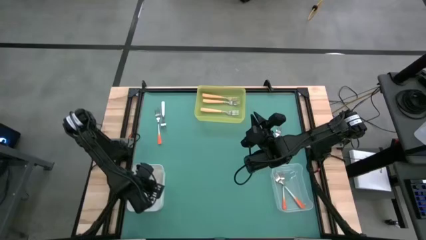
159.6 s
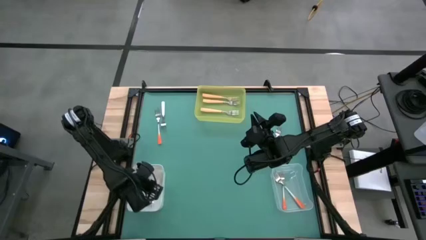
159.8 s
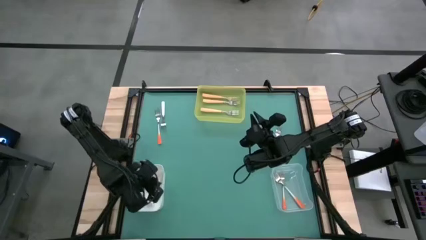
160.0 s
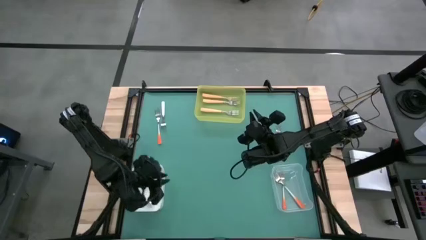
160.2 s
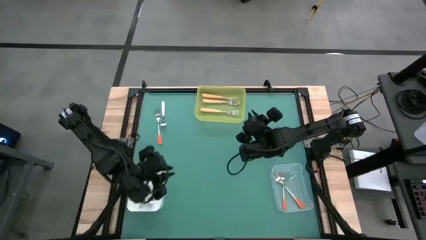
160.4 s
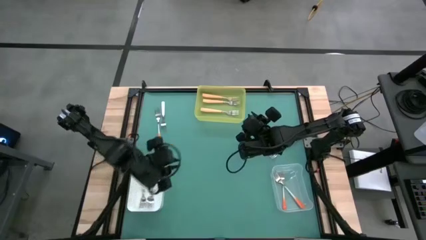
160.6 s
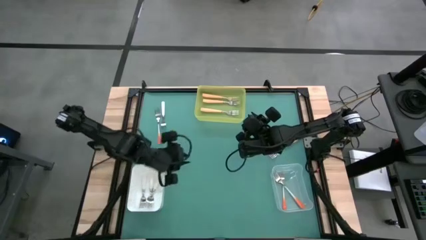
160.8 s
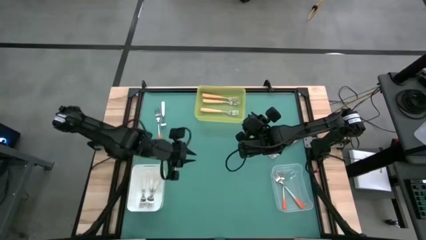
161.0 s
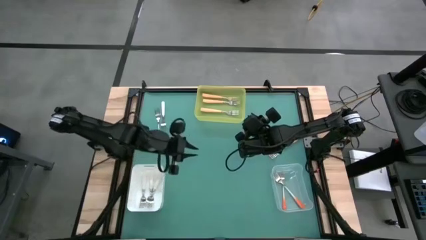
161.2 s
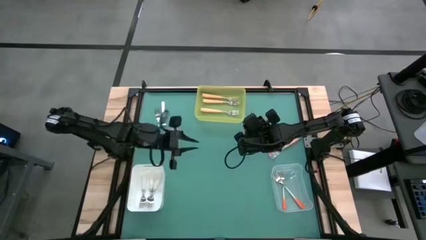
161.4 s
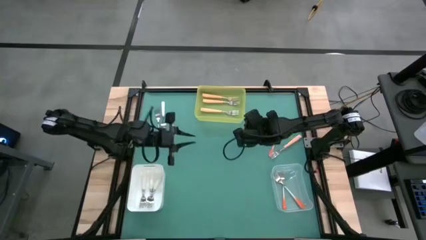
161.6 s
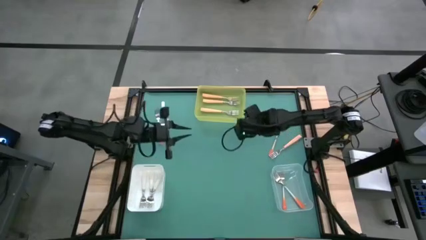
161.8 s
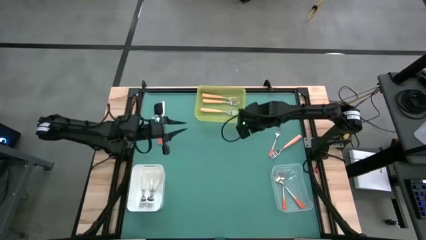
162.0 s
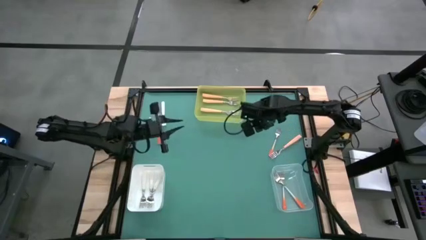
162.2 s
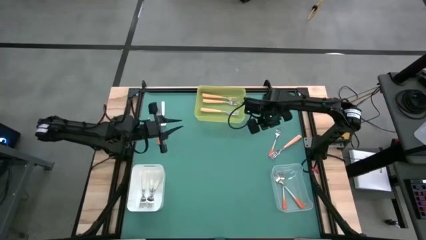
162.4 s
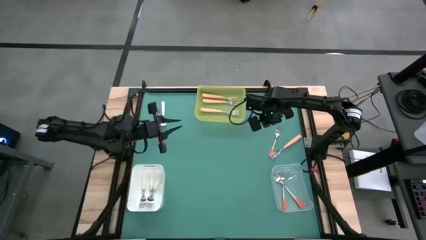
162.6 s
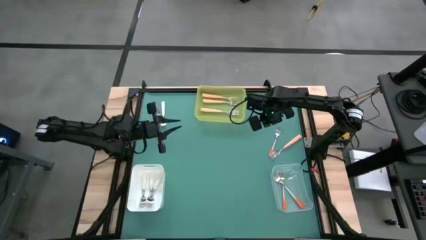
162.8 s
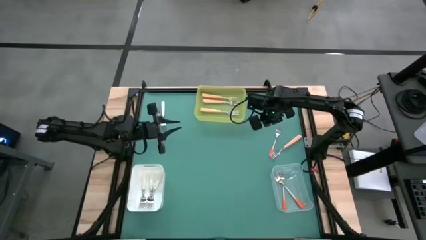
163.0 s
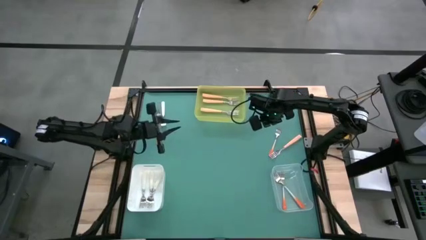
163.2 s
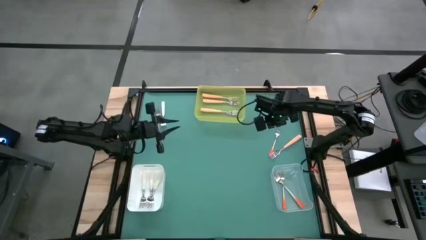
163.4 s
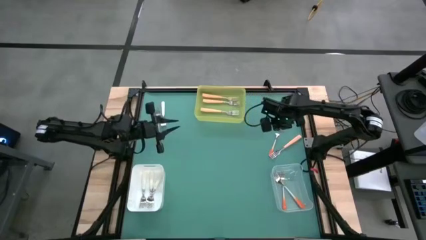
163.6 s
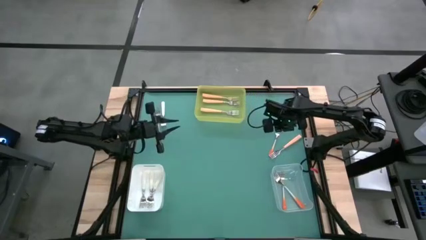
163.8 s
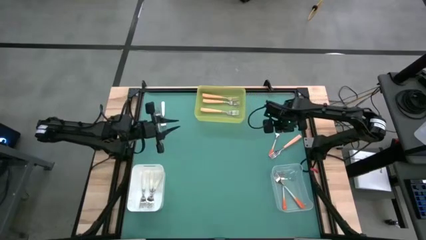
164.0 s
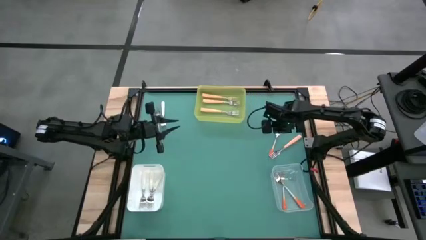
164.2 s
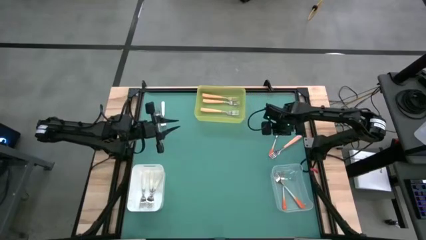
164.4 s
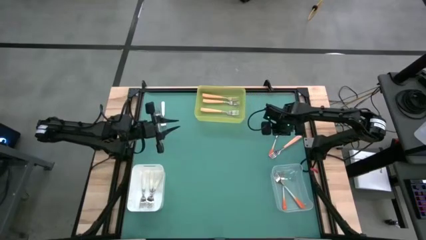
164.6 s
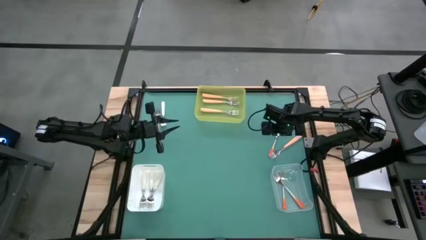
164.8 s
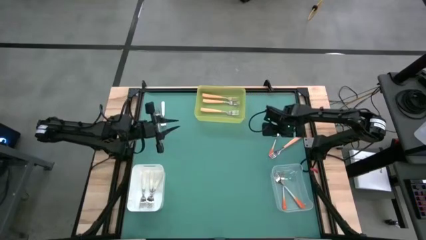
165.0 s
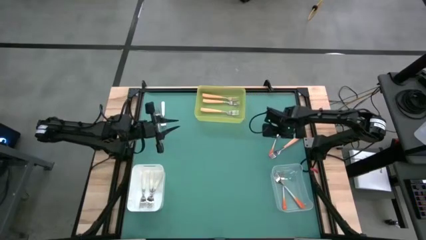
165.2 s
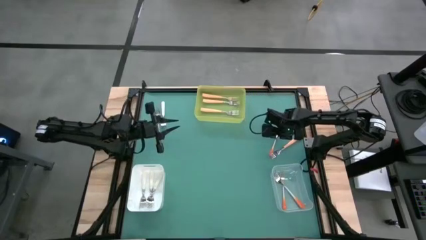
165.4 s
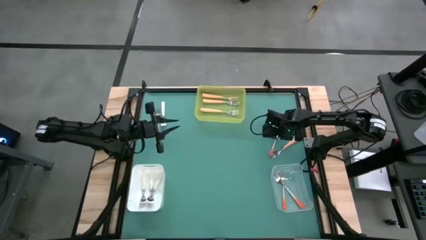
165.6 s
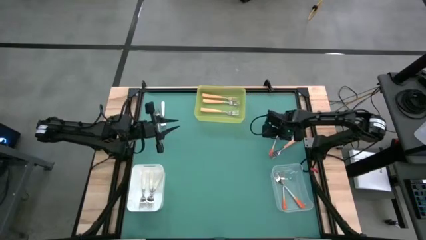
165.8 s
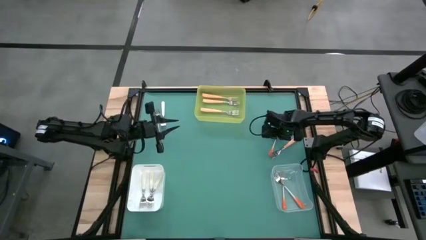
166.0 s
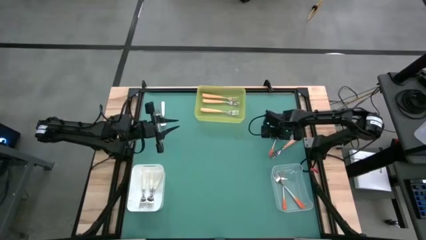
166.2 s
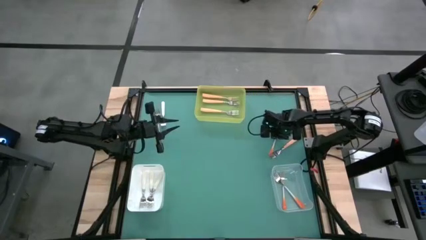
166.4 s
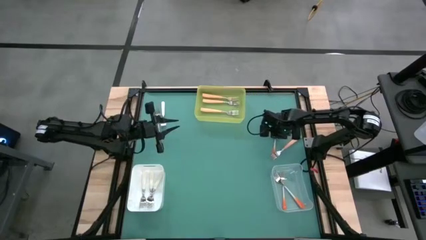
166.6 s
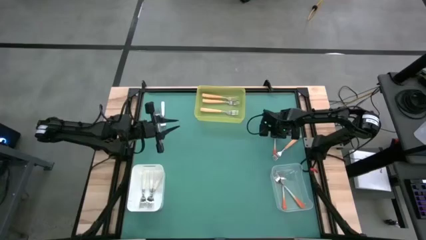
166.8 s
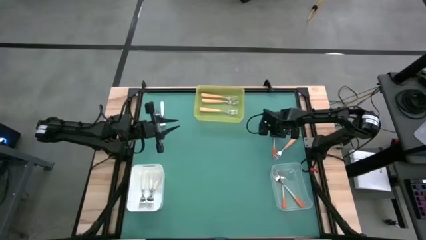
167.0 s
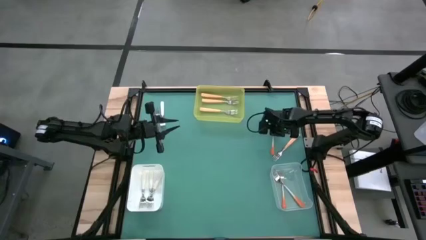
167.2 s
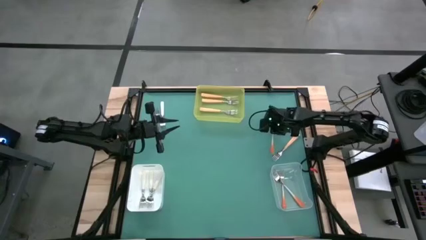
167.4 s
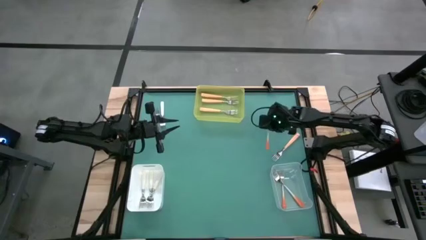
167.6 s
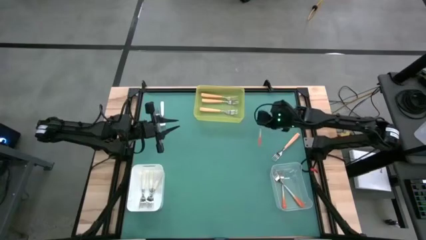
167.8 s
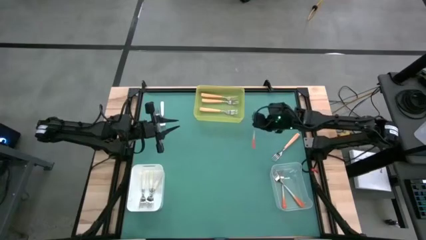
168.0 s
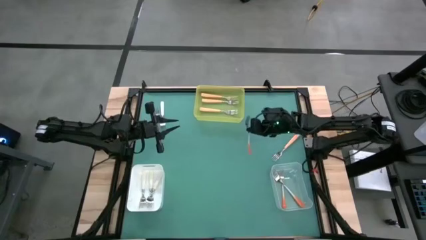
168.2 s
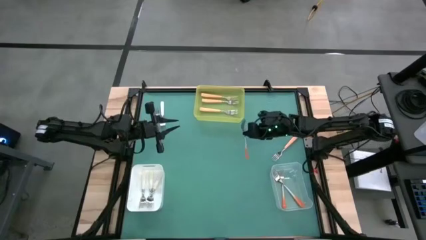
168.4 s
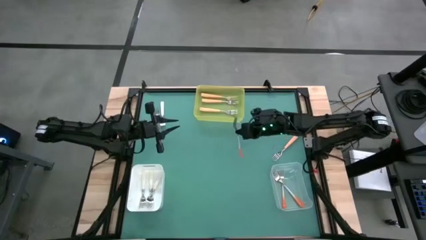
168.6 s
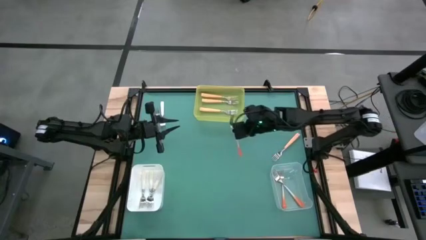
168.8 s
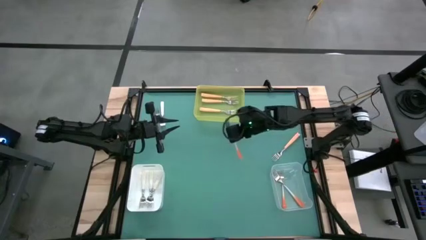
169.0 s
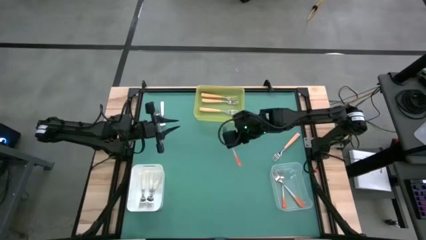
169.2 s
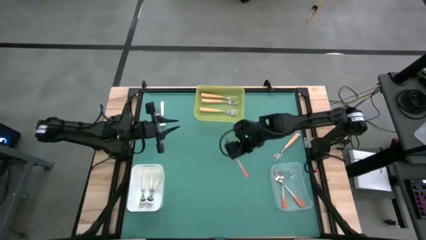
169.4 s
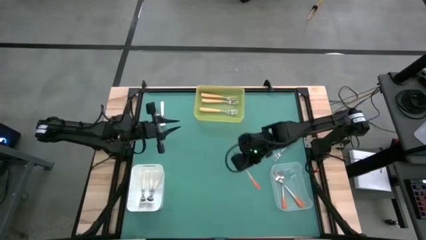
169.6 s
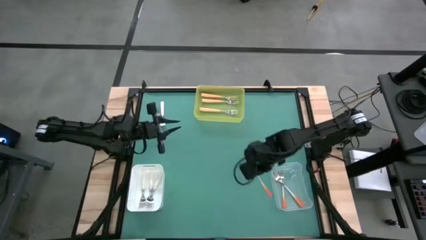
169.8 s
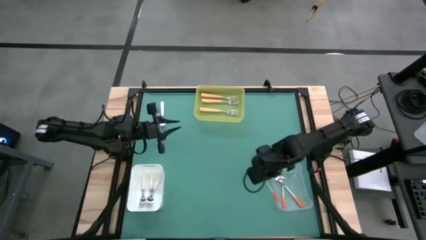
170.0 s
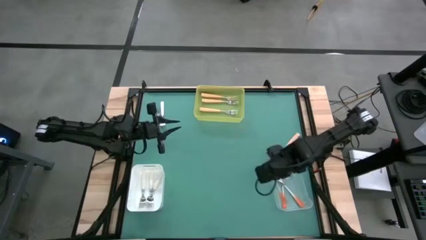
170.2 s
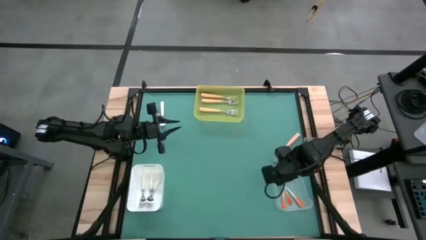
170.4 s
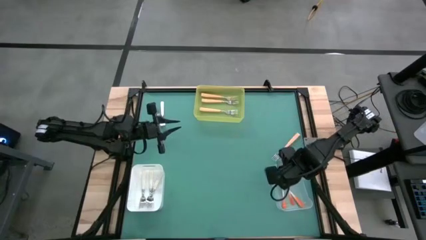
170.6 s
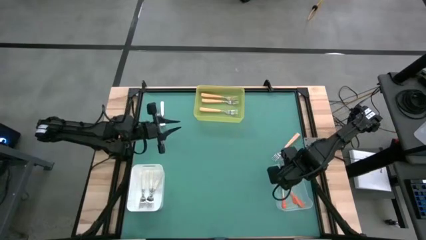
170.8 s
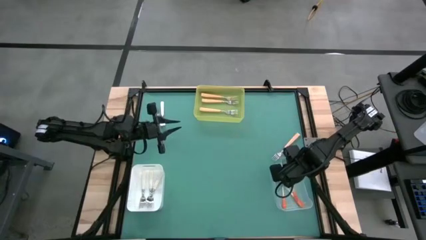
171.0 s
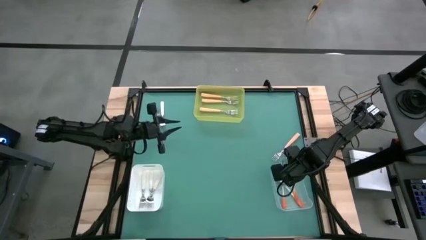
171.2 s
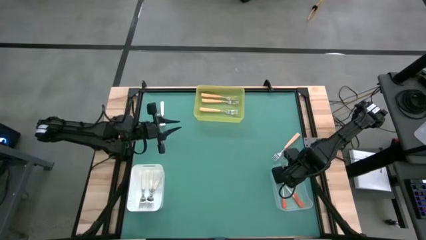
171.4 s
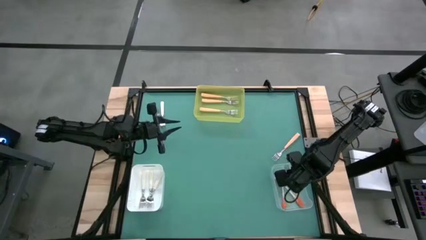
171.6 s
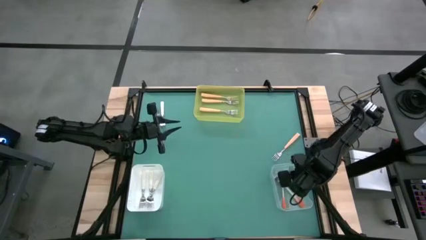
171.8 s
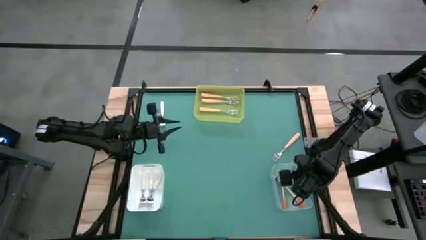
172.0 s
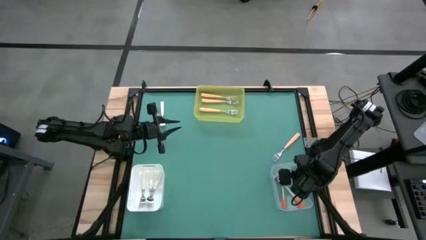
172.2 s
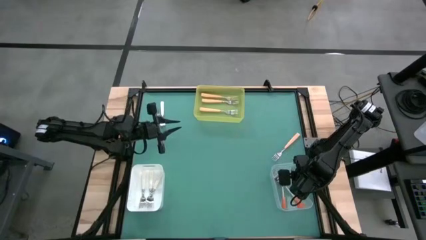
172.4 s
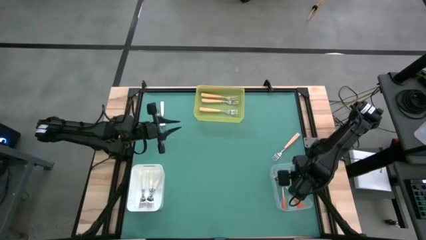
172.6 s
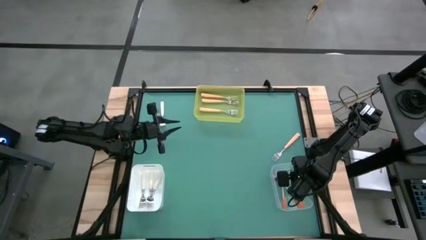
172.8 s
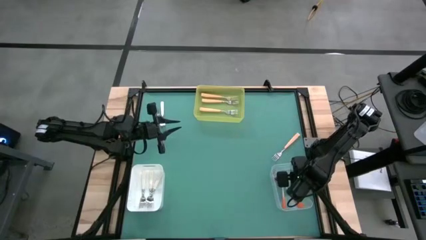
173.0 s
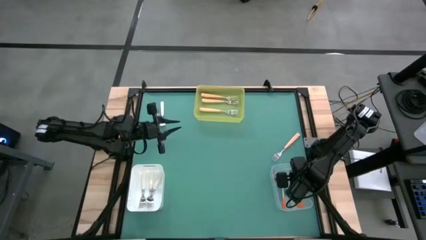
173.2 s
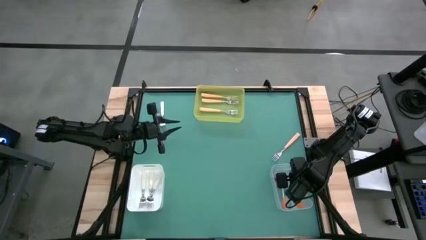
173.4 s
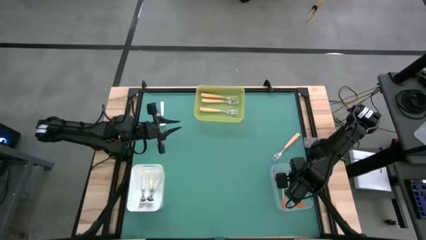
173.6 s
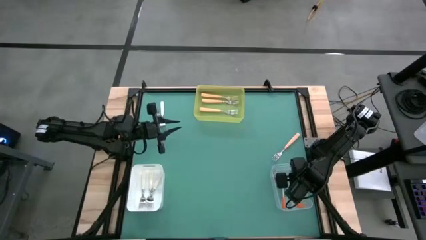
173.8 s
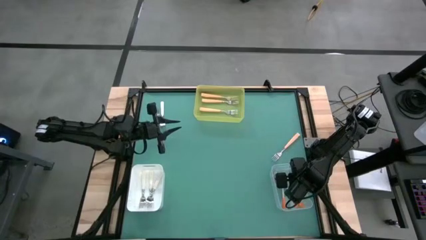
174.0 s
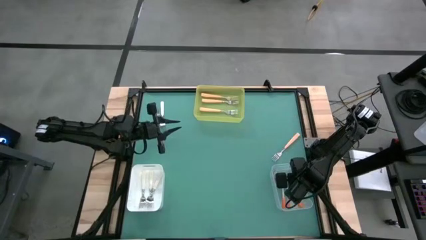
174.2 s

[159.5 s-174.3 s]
Task: Sort silverware by color (type)
Put the orange fork into the transparent bin
